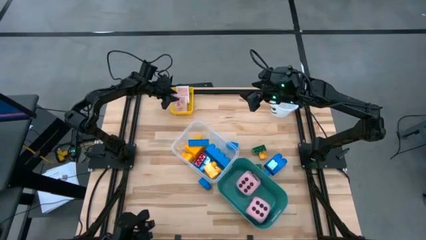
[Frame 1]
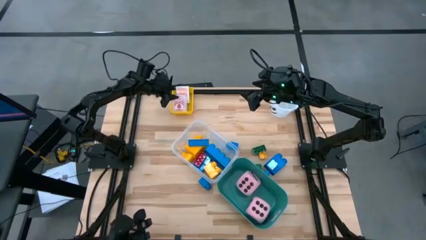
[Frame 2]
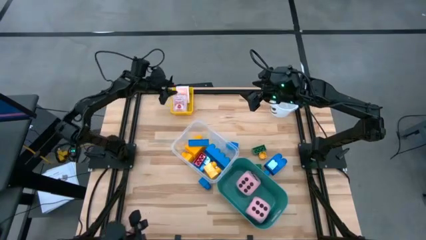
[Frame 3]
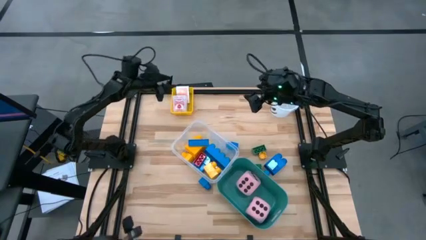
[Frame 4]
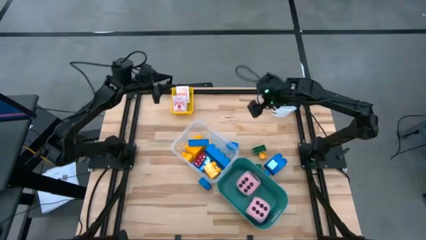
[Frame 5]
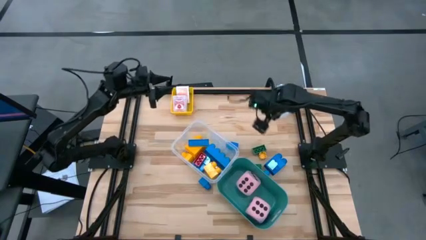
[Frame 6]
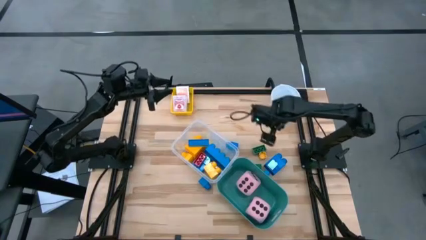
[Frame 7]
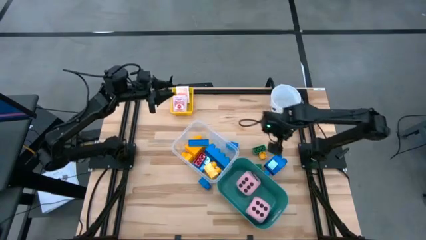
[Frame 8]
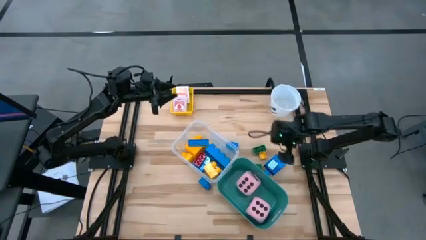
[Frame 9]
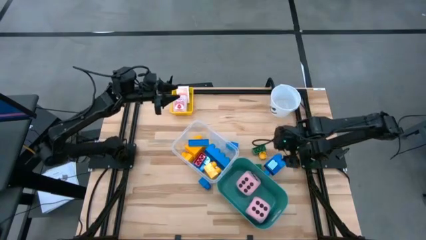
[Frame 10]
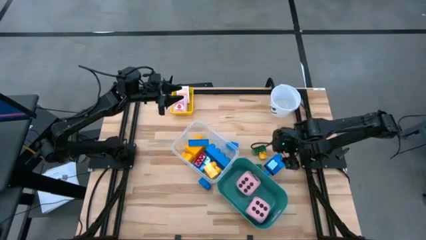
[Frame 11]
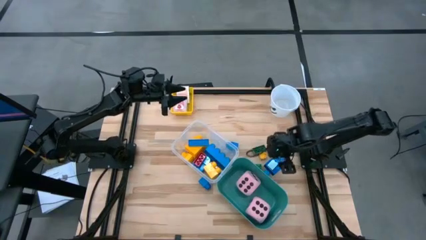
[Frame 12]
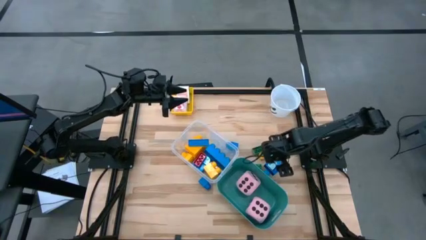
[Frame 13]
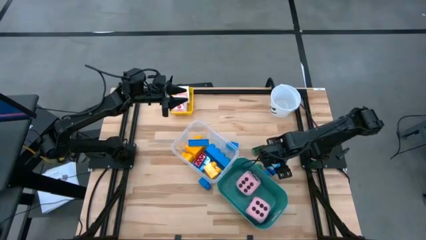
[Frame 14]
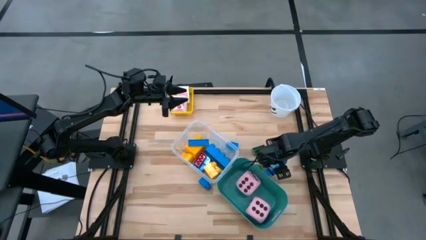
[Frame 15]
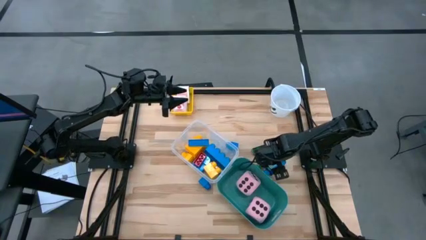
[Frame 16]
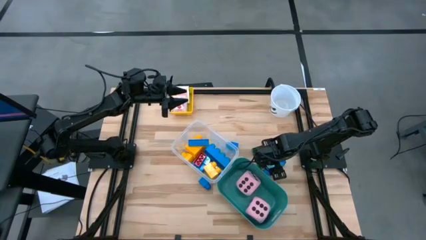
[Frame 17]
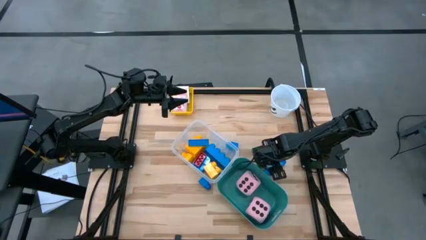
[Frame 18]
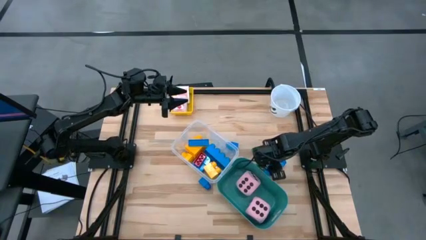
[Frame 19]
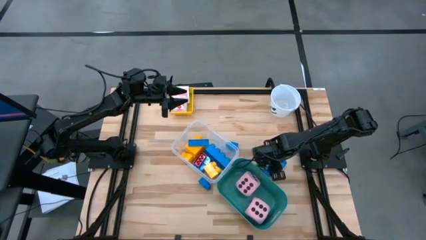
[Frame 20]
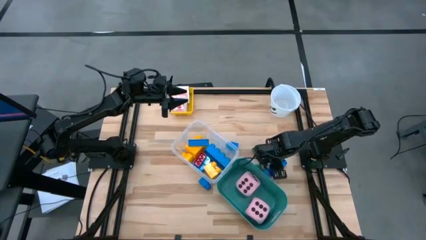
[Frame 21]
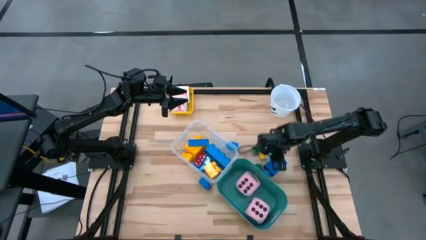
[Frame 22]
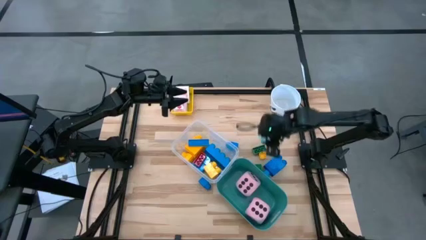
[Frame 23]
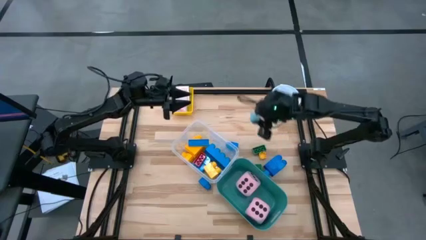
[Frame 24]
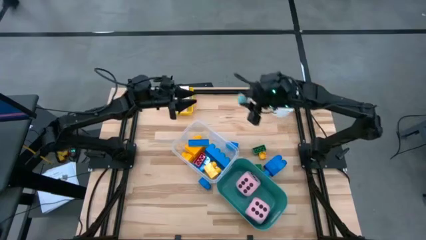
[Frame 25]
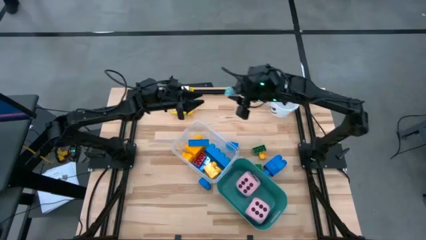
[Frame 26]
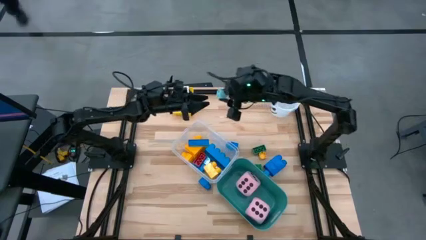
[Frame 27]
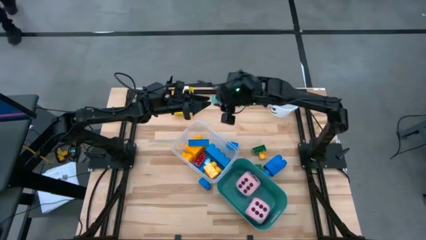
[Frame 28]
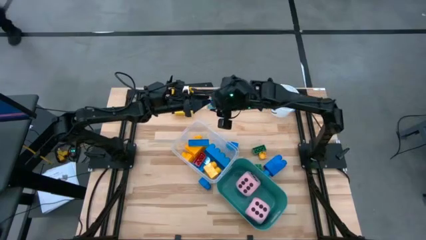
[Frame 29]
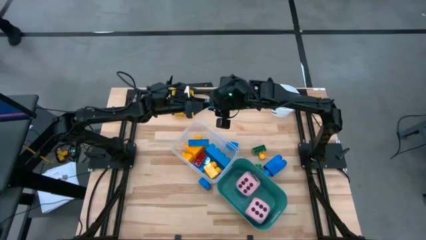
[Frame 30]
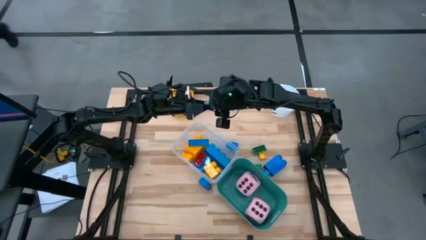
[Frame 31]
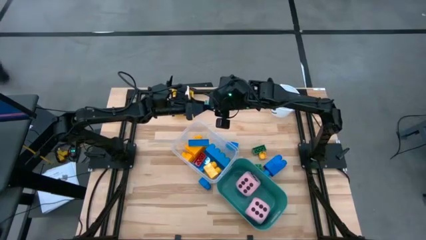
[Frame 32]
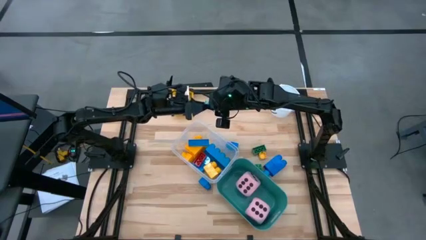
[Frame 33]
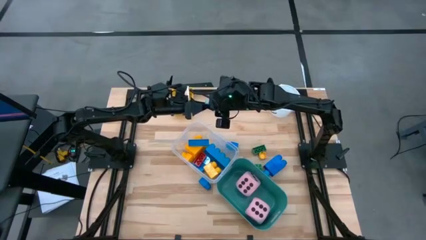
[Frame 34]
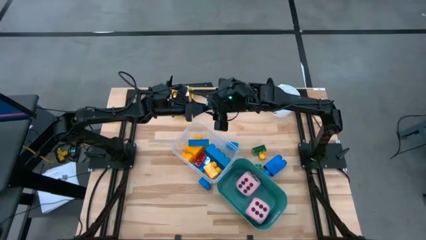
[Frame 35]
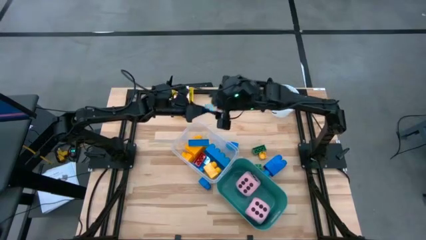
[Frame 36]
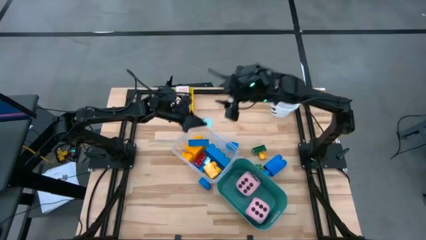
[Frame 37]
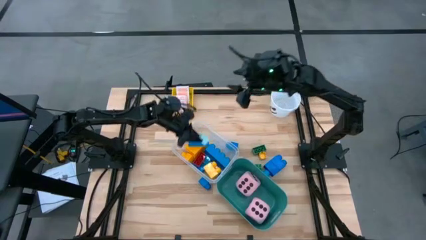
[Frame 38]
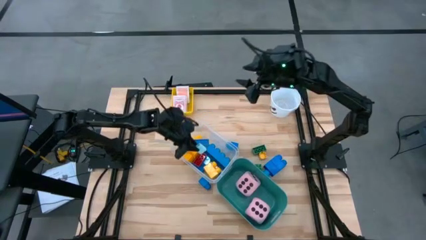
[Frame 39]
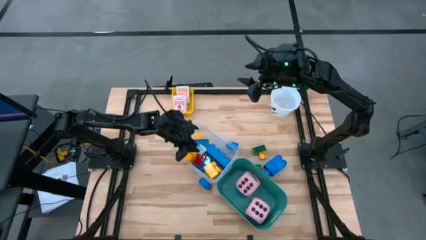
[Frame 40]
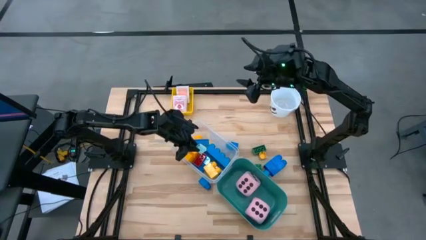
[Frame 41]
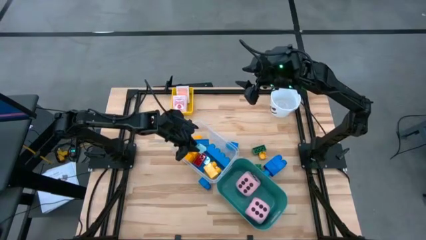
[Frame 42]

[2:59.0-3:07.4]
Task: Pick & Place Toys
Put the light blue game piece into the transparent bin

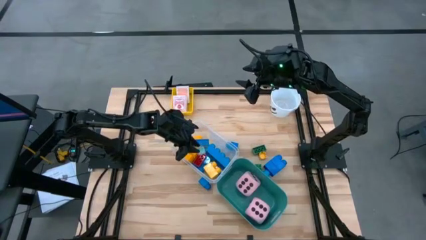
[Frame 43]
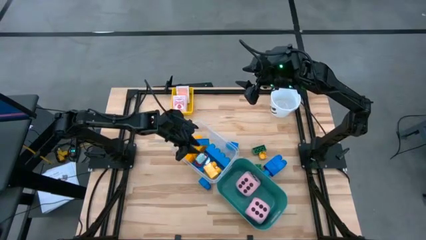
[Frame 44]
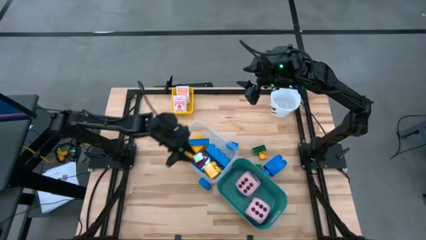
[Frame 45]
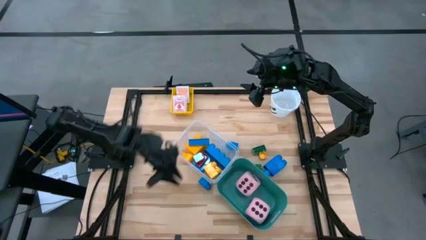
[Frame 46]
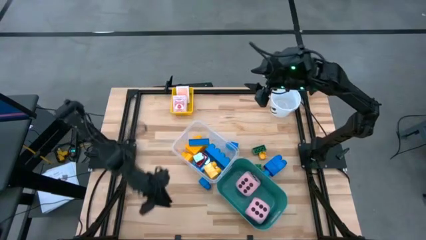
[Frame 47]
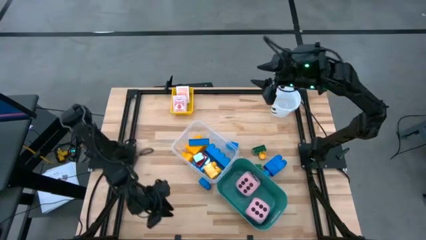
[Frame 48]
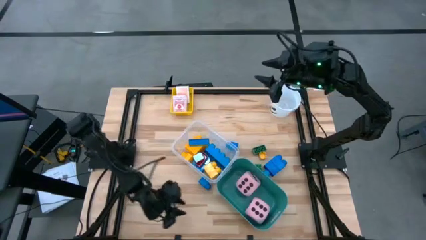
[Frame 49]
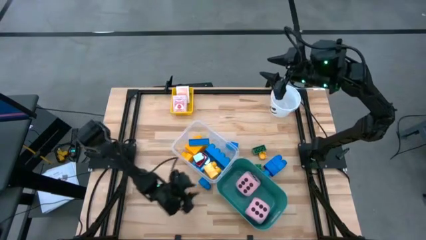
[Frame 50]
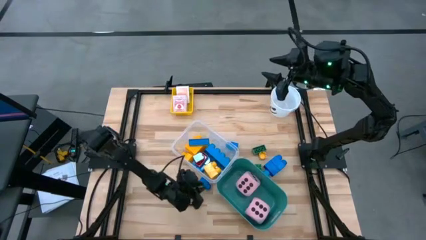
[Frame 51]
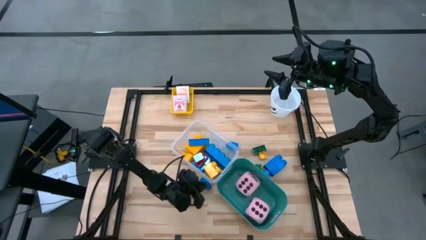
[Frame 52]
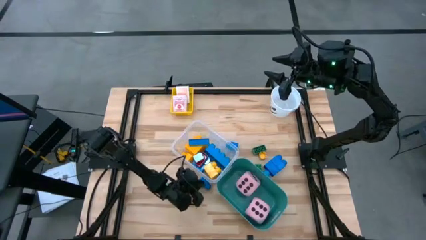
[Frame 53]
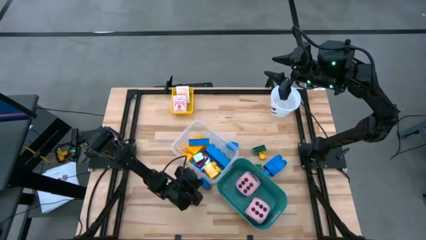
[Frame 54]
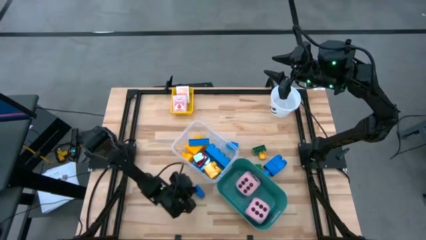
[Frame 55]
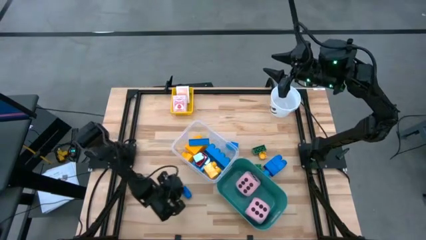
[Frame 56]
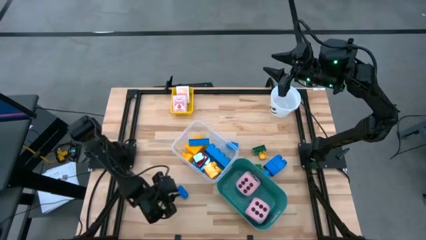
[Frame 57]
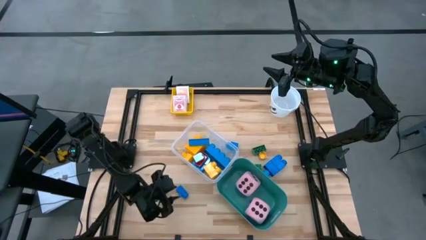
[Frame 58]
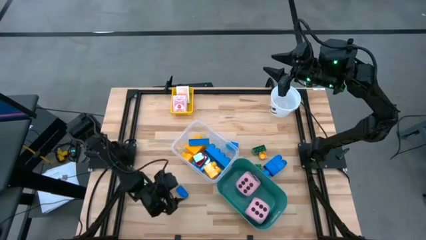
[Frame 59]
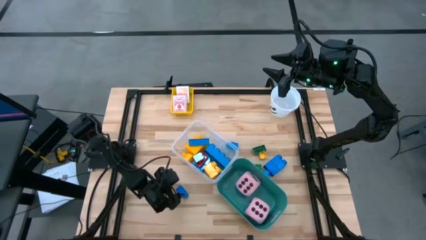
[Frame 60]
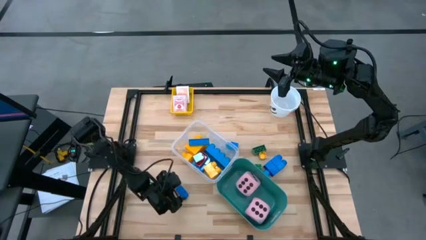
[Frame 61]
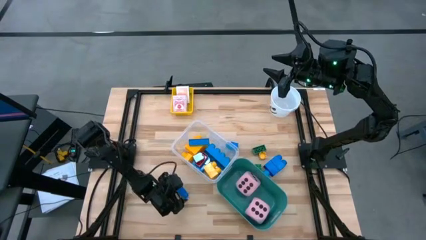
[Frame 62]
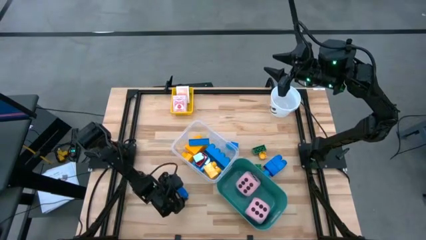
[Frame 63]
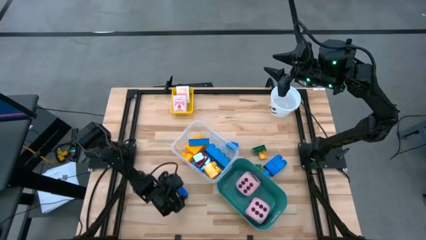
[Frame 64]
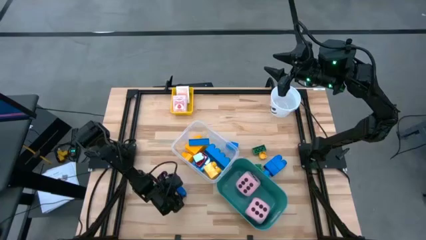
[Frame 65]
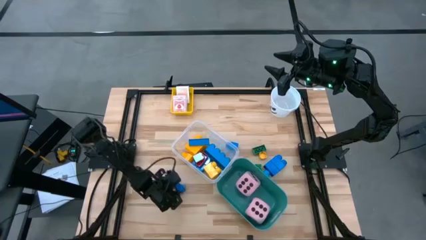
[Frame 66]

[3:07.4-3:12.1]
Put the blue game piece into the transparent bin

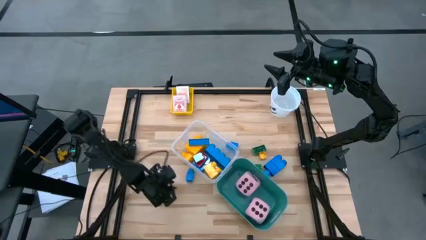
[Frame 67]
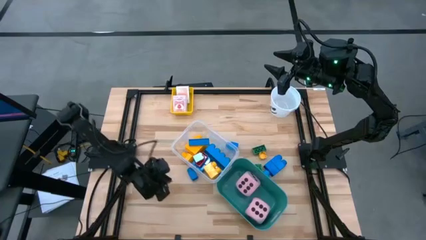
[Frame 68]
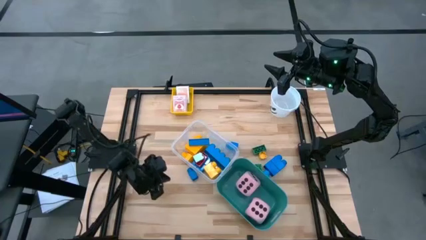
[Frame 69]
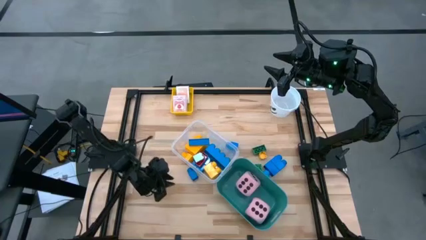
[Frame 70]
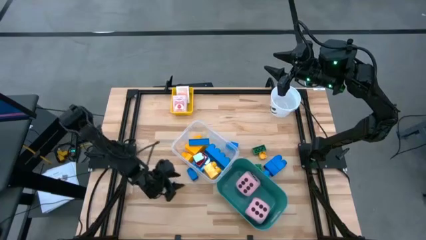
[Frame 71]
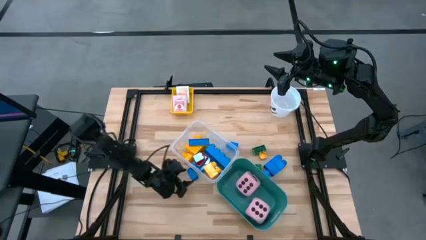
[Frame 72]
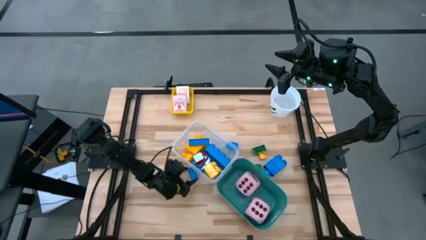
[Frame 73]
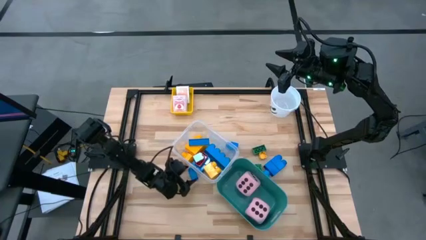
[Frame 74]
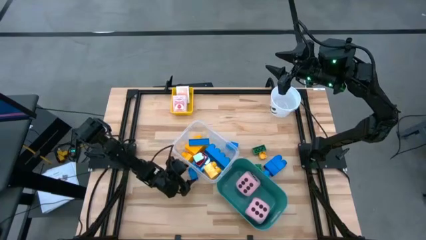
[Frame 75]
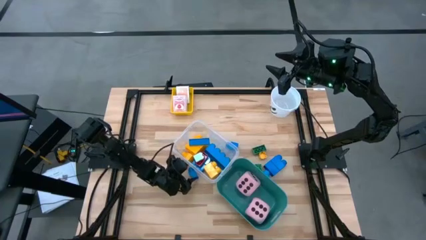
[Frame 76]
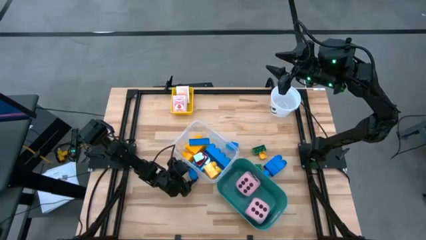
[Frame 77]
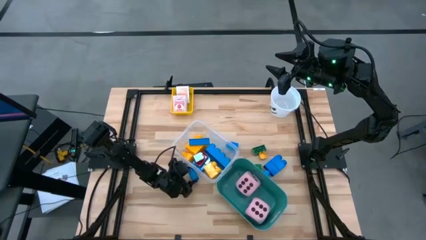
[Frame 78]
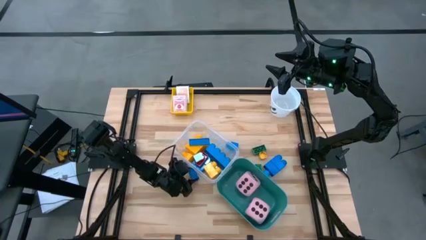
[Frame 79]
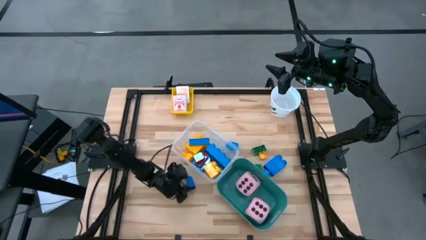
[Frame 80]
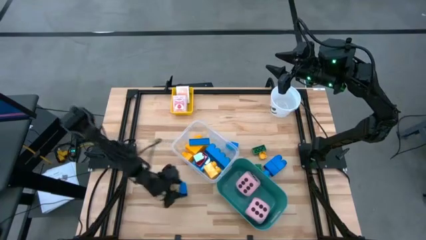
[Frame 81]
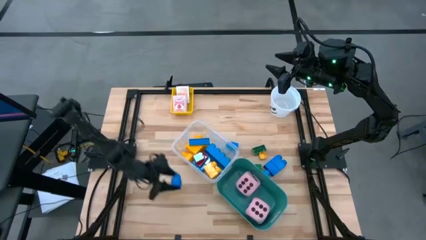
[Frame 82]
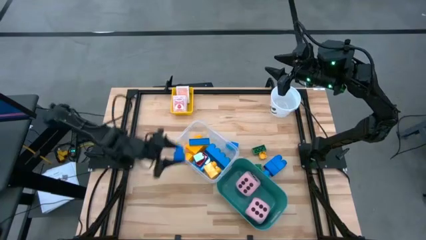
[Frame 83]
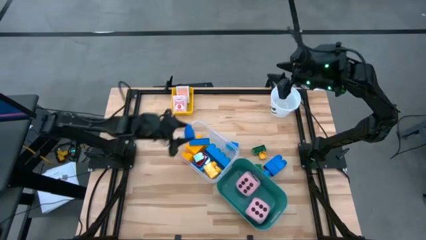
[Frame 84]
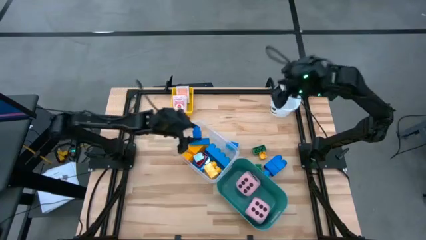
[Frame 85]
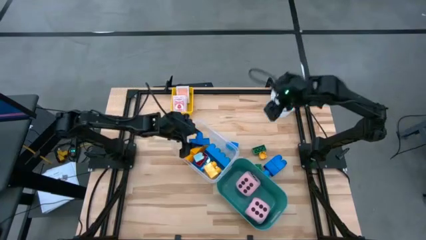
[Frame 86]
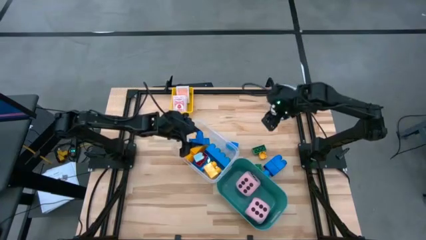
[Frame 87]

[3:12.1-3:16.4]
Put the blue game piece into the transparent bin
